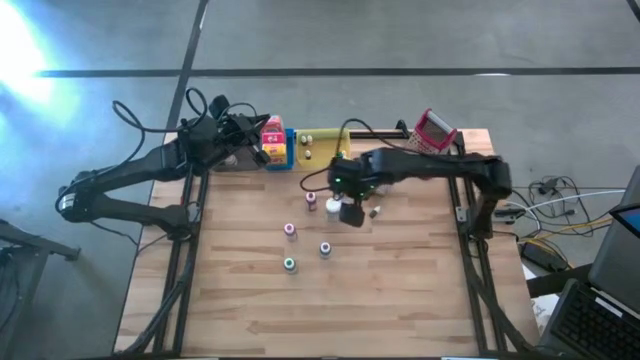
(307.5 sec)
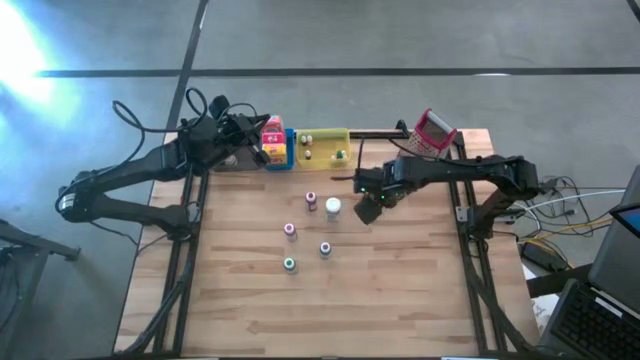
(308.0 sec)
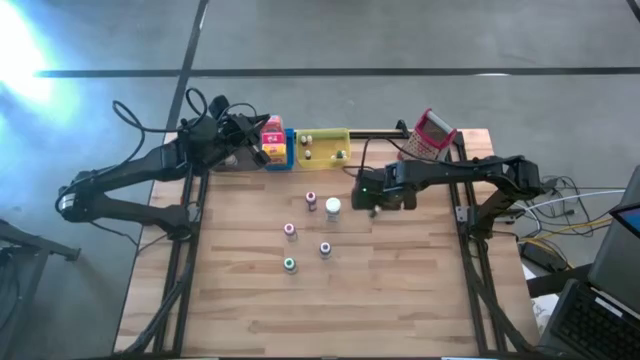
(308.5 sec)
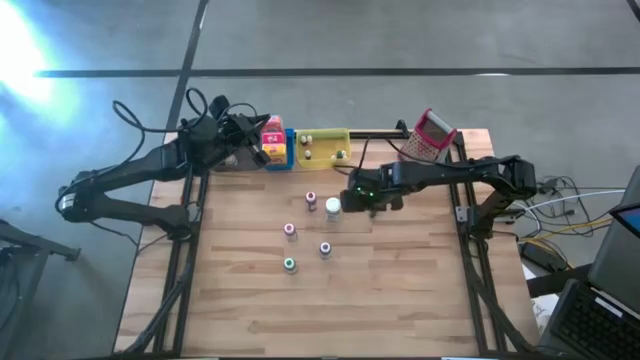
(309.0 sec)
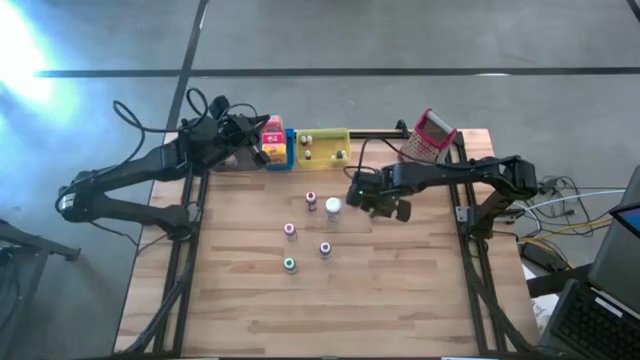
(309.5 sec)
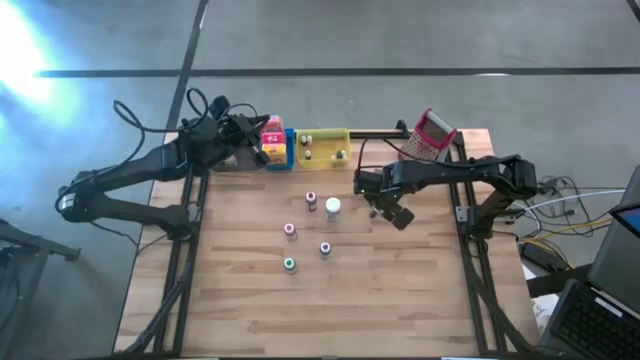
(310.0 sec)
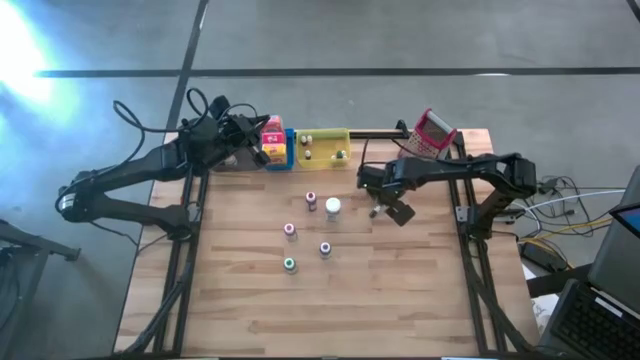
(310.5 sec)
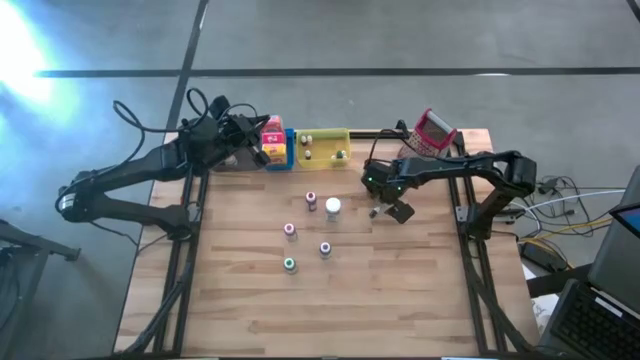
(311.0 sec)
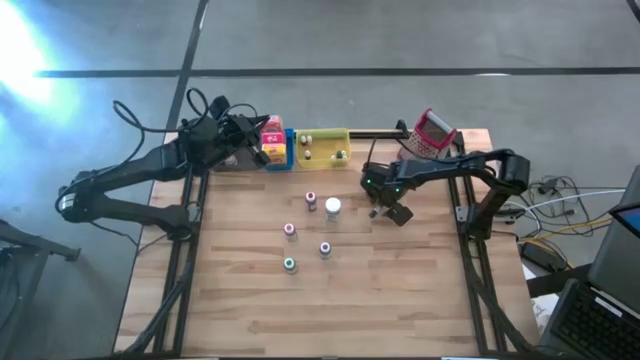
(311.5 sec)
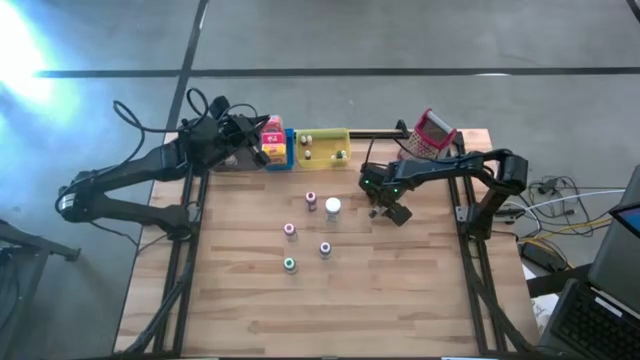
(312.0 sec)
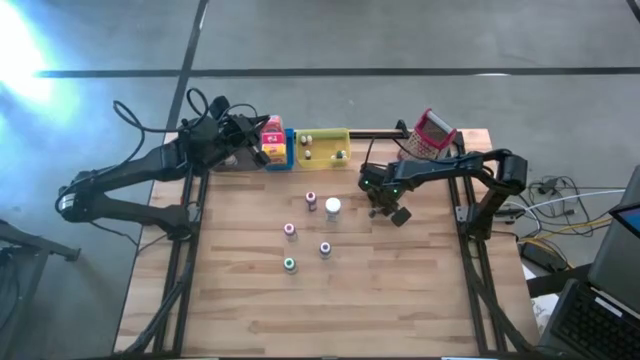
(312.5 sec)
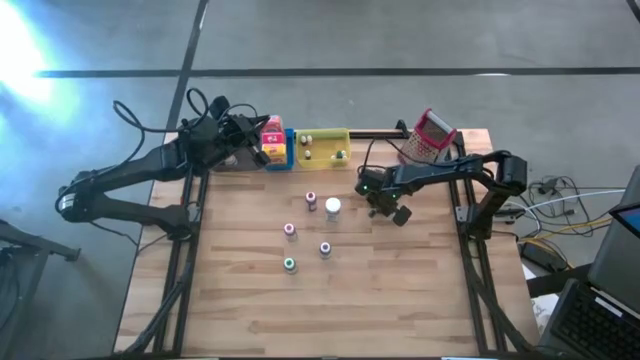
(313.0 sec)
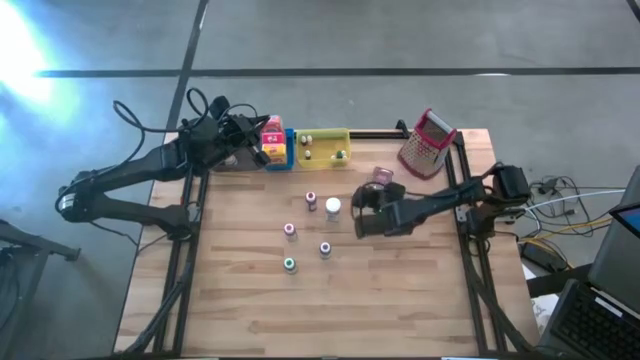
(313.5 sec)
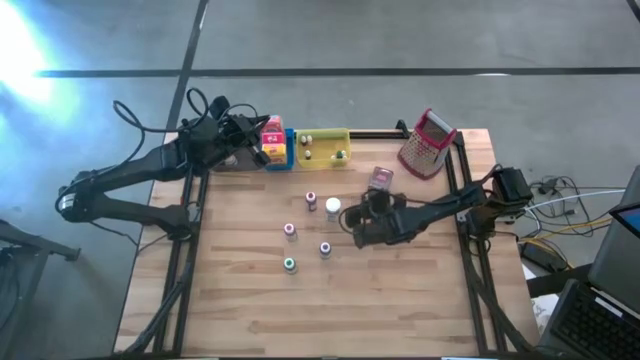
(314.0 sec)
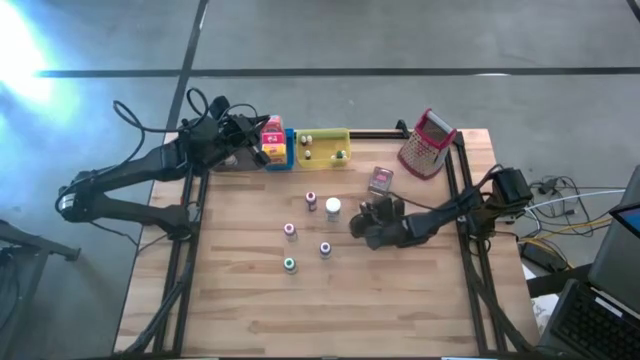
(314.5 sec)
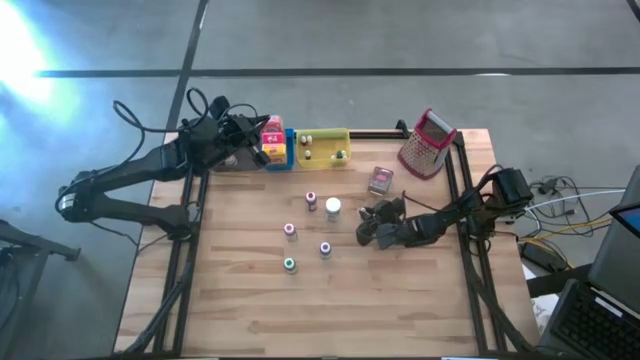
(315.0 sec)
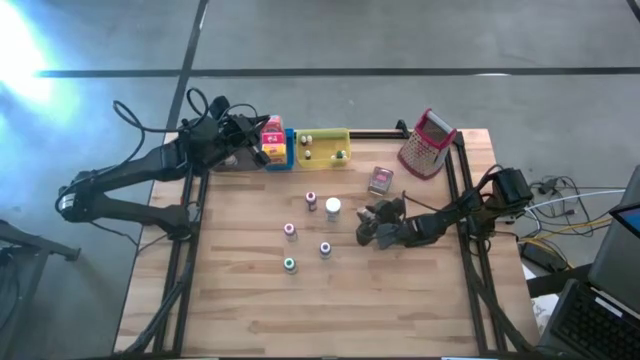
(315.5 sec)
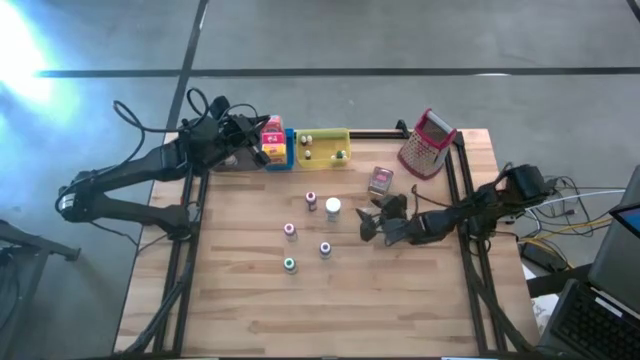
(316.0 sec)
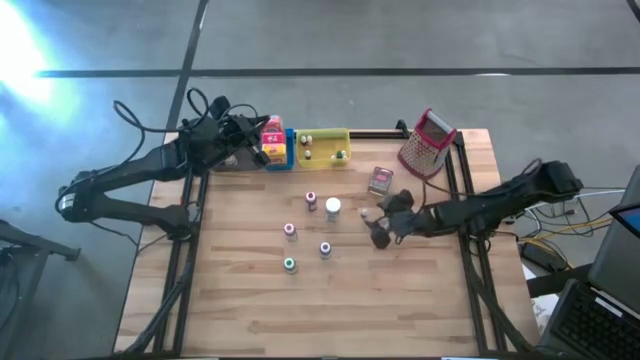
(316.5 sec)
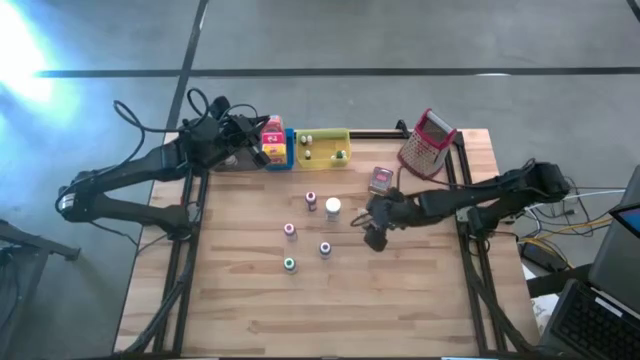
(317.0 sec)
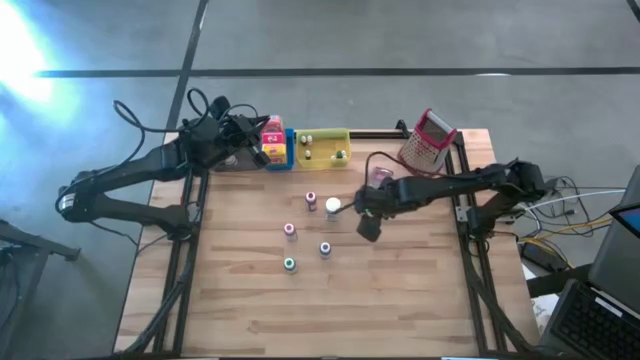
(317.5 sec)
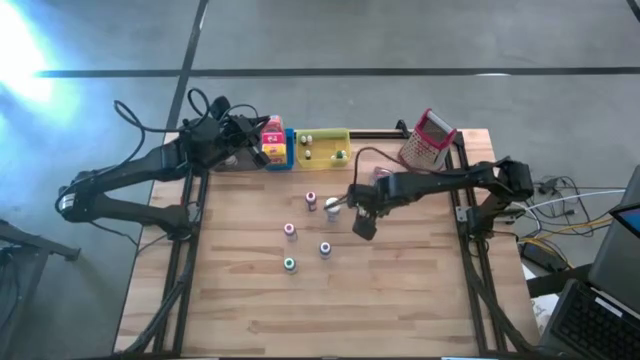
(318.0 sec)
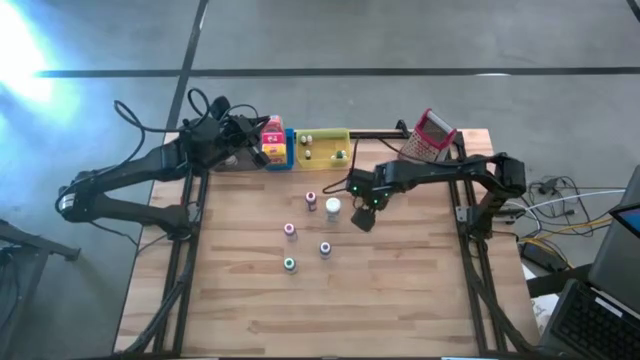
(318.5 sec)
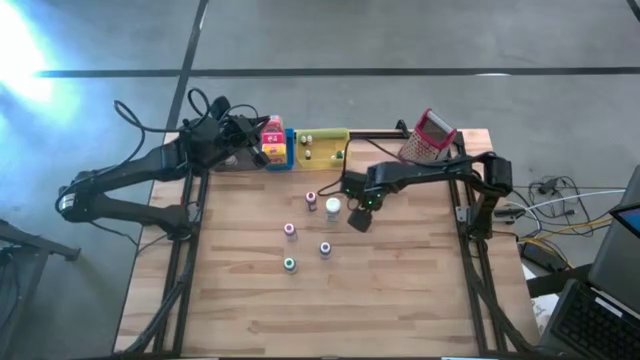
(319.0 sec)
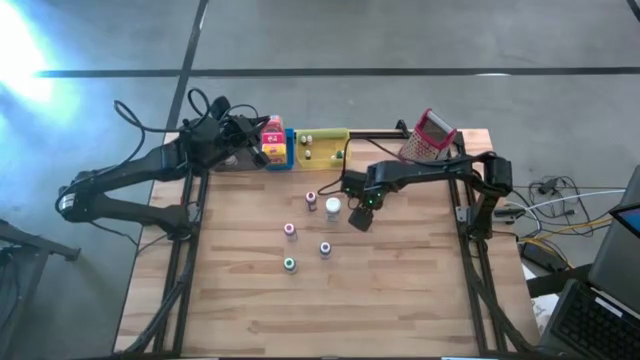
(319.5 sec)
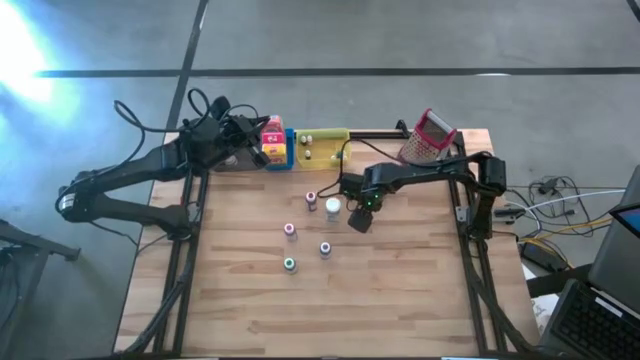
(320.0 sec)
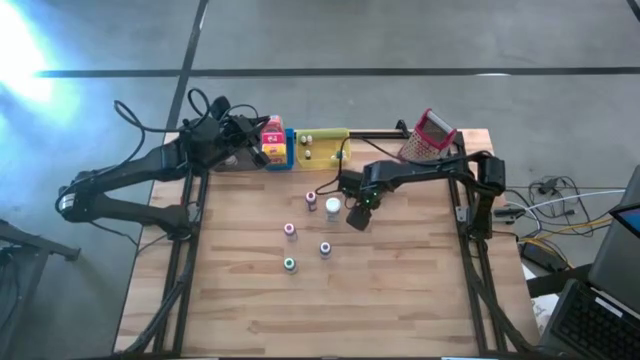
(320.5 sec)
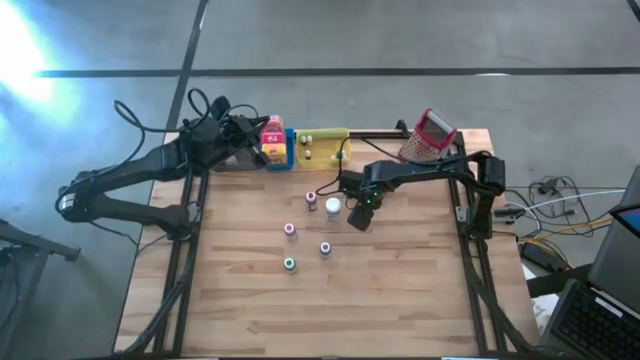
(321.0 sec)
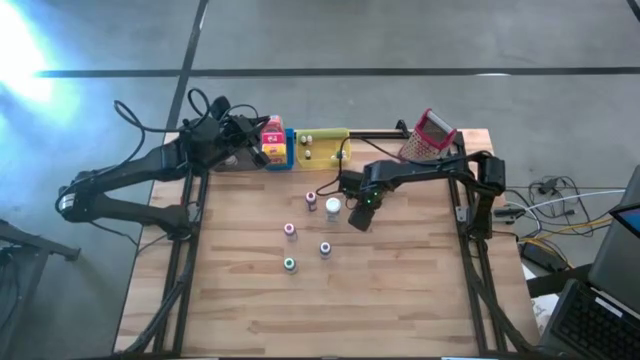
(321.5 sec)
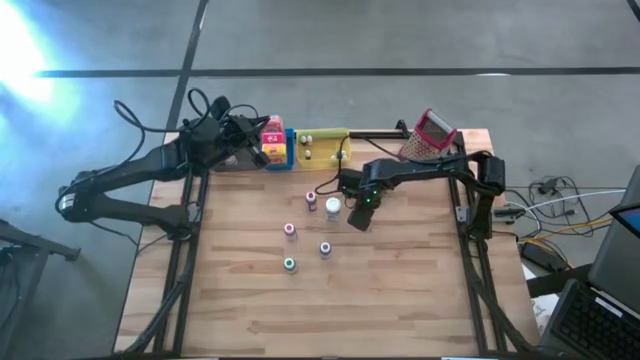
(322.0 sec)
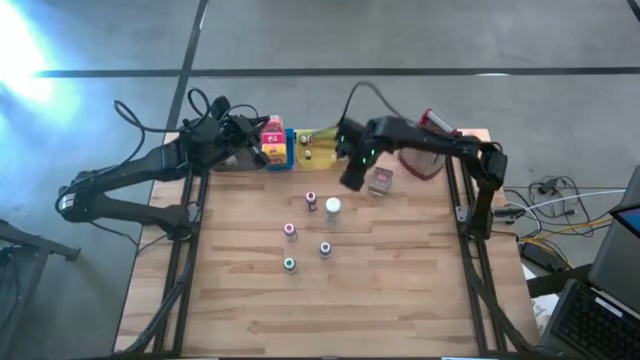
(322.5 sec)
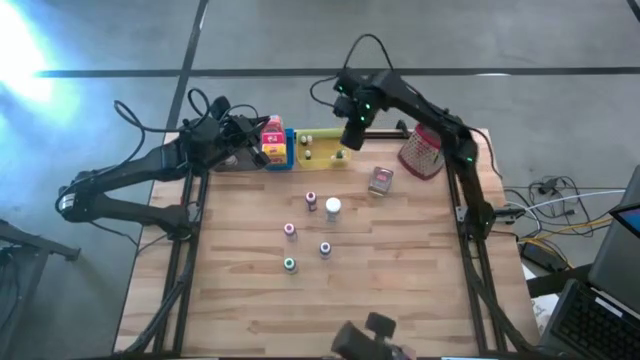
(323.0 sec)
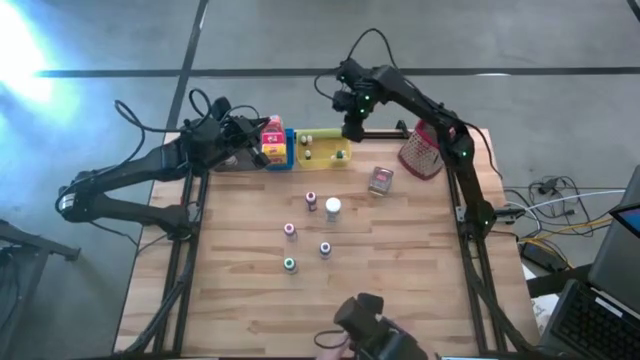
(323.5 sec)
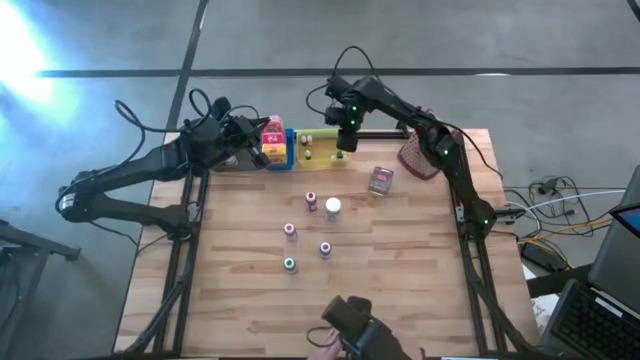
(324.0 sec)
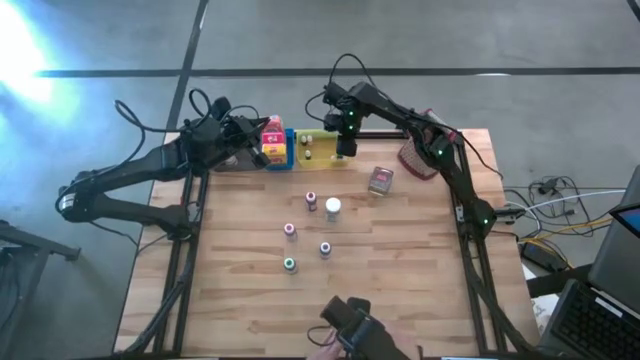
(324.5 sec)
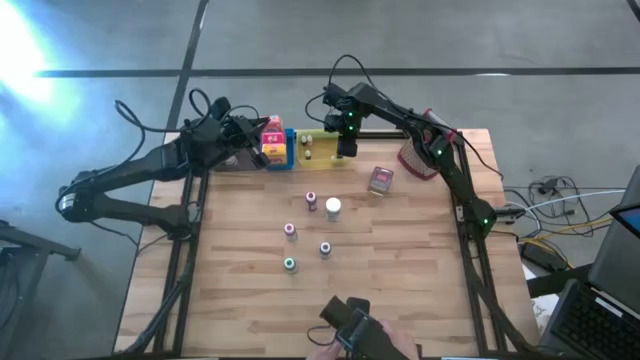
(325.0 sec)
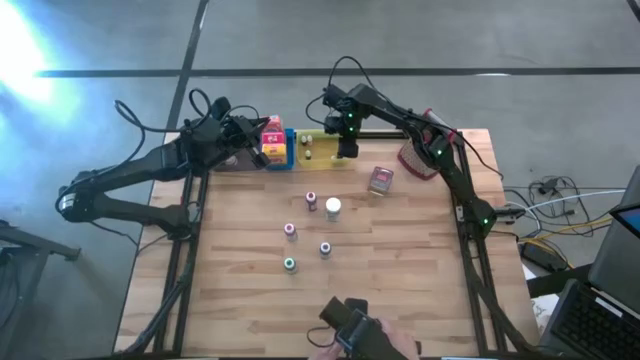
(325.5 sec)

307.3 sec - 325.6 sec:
Task: Pick & Place Kitchen Items
Put the black food coloring bottle into the yellow bin

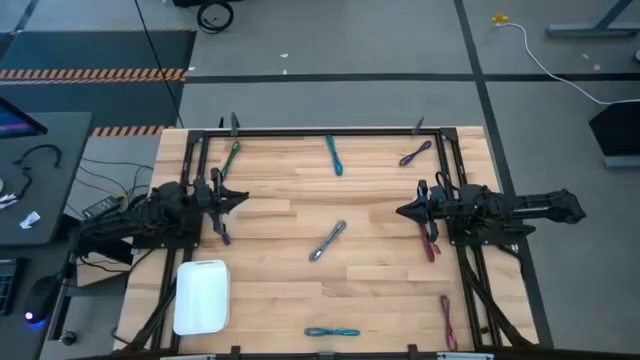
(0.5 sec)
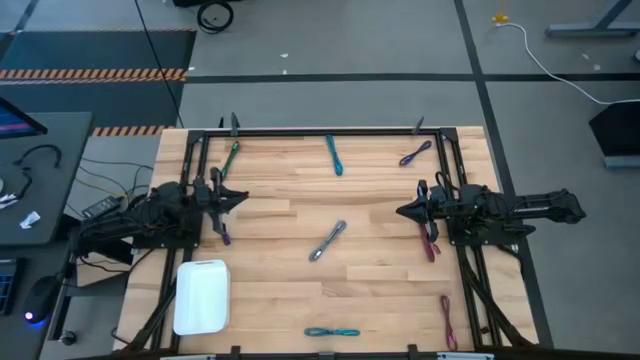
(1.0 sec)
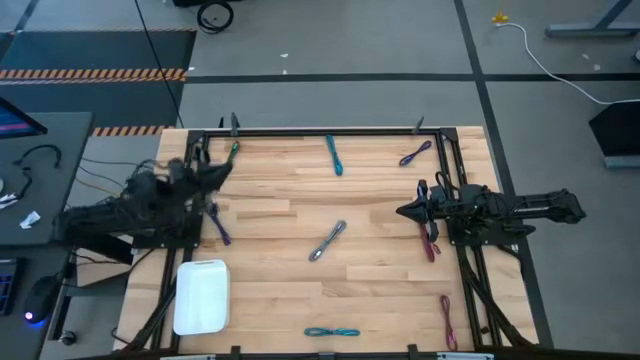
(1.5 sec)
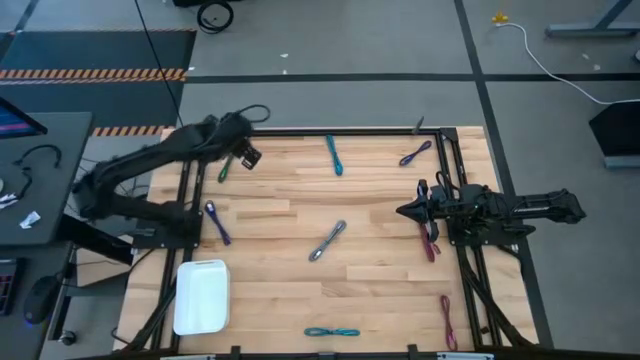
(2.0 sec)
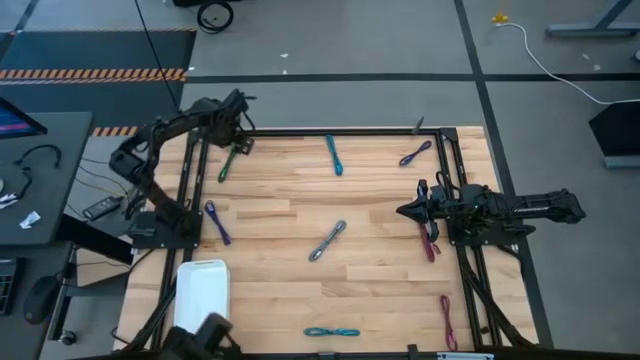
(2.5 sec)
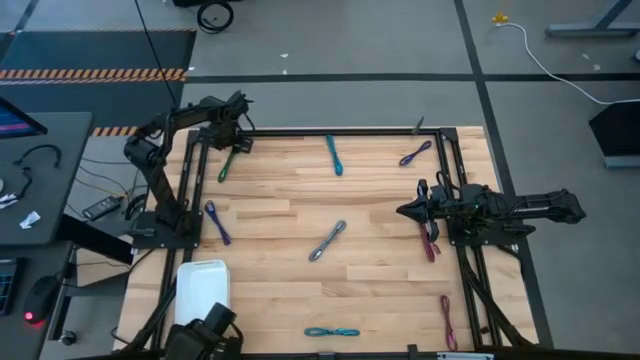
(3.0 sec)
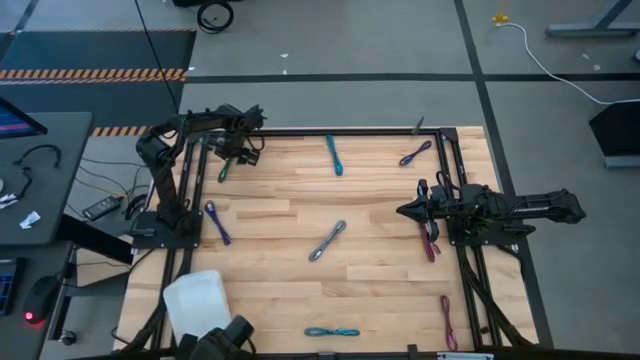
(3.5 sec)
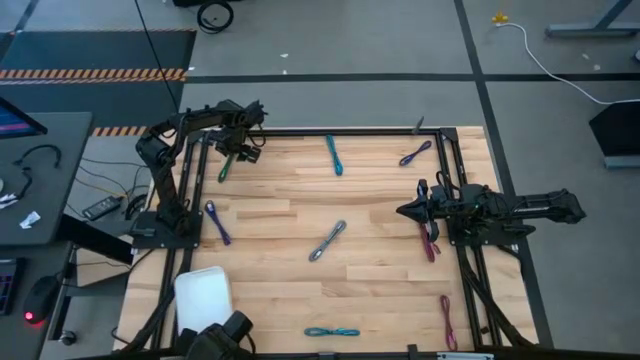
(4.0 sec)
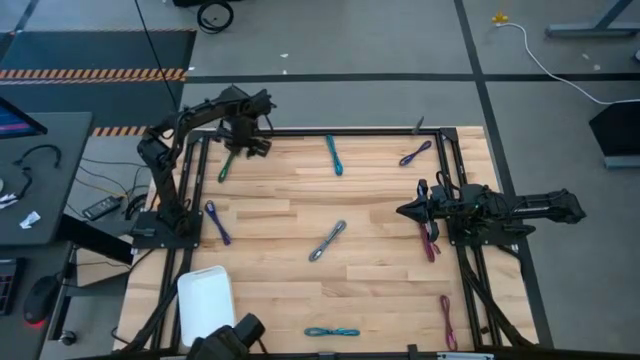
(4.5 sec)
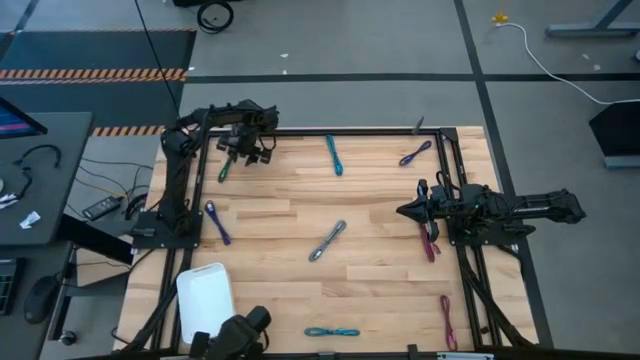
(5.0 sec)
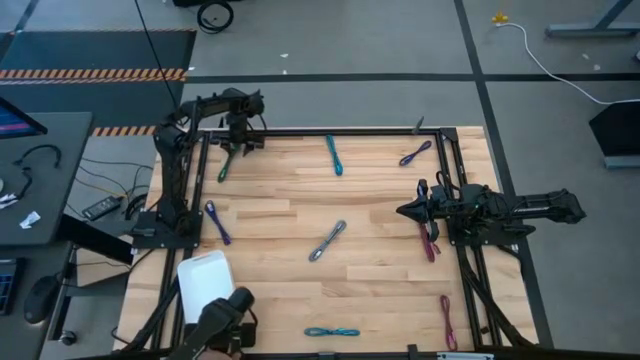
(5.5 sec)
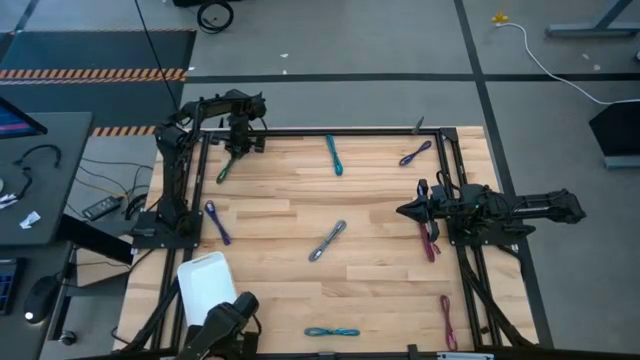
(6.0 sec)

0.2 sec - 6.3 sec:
Task: Pick and place USB-C Cables
Put the green charger cable into the white bin
